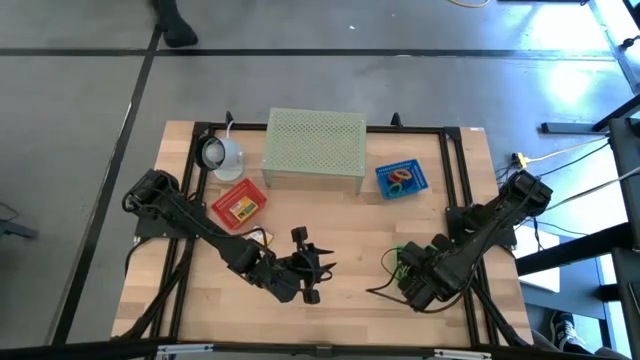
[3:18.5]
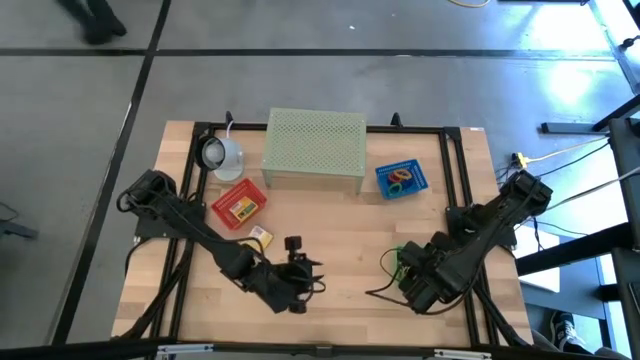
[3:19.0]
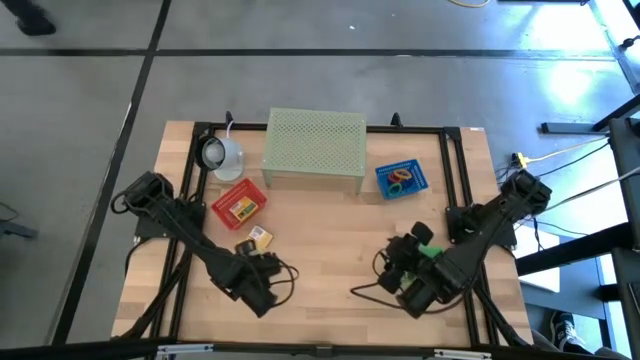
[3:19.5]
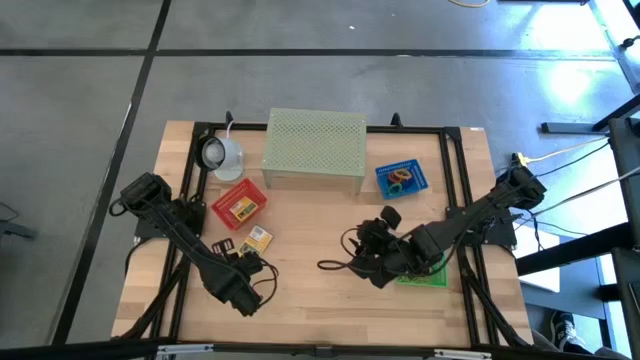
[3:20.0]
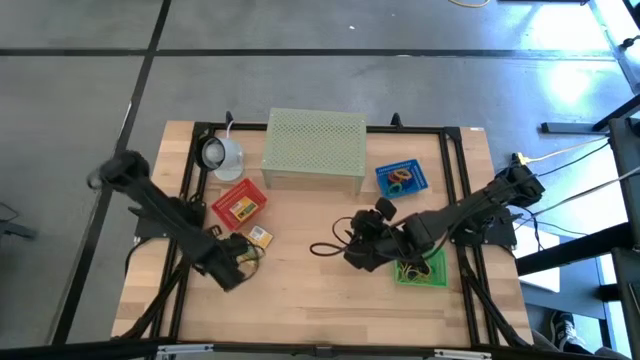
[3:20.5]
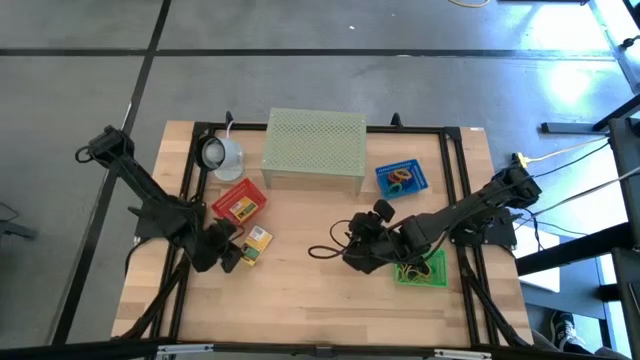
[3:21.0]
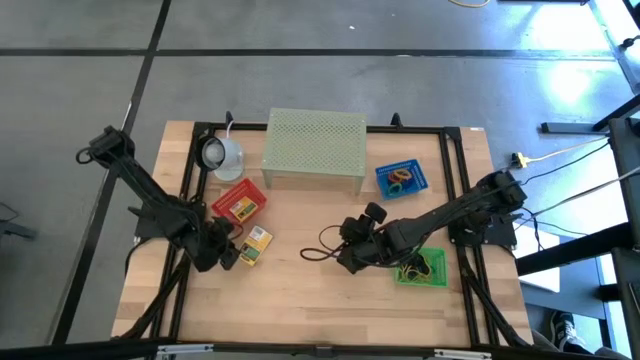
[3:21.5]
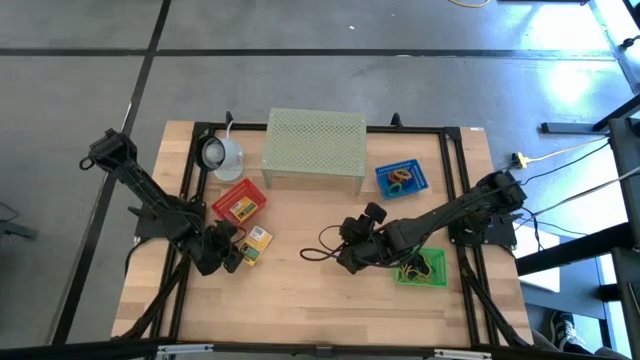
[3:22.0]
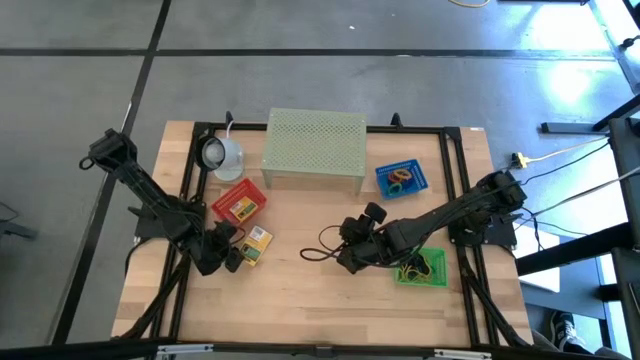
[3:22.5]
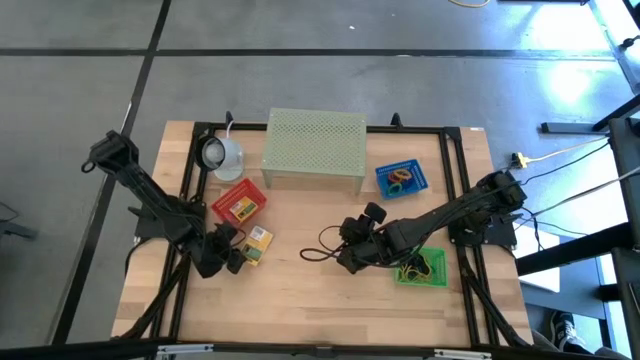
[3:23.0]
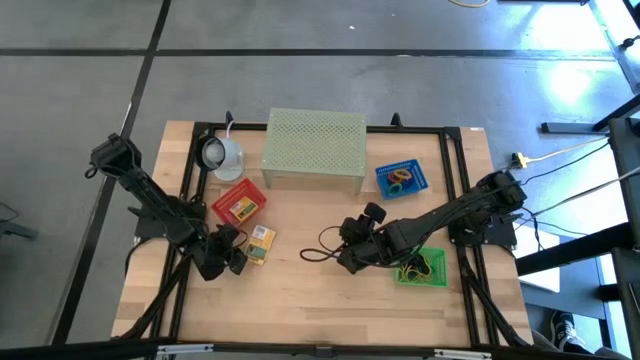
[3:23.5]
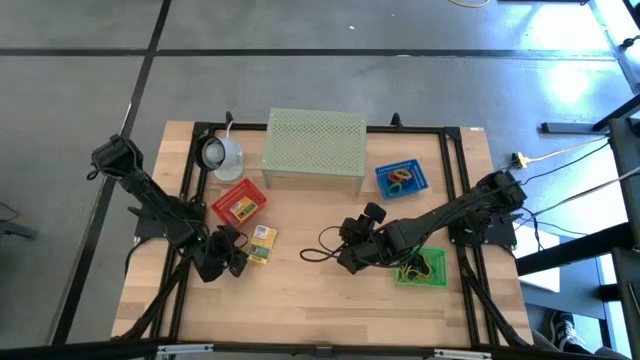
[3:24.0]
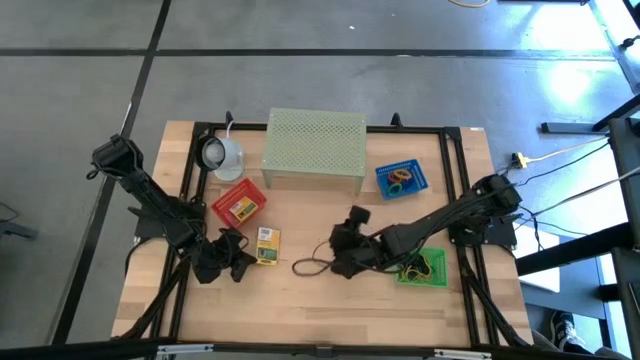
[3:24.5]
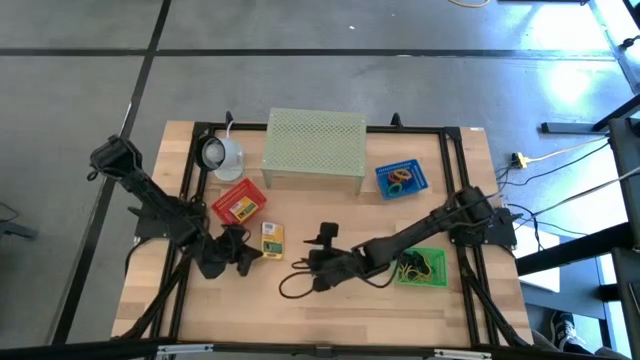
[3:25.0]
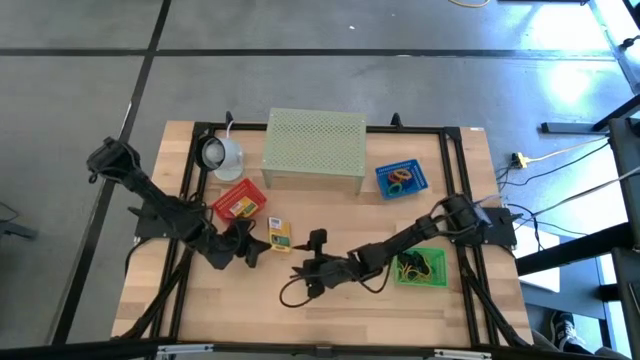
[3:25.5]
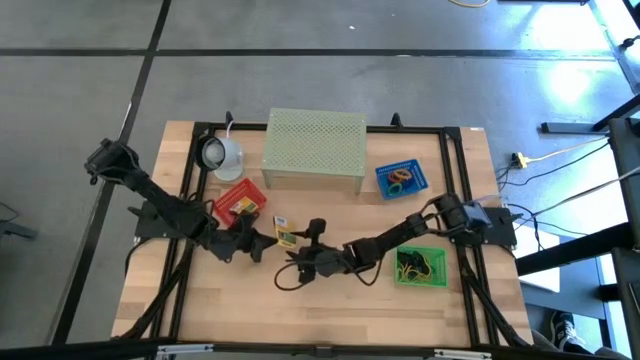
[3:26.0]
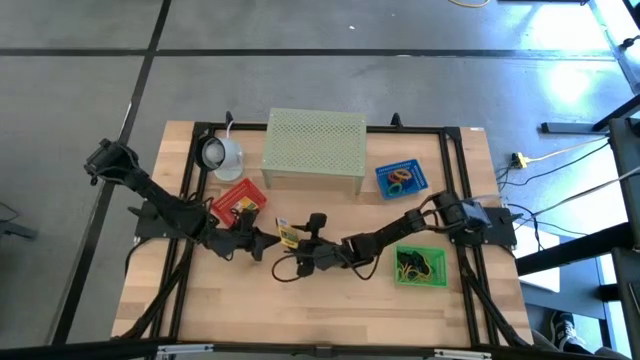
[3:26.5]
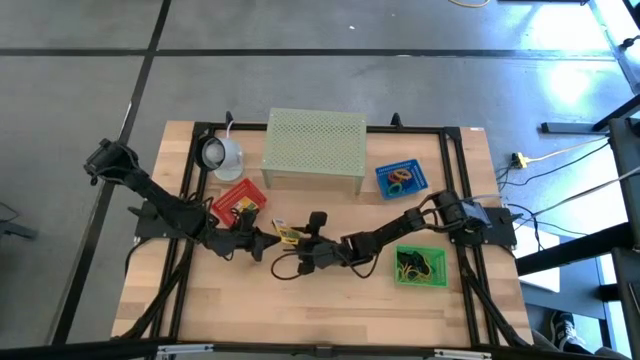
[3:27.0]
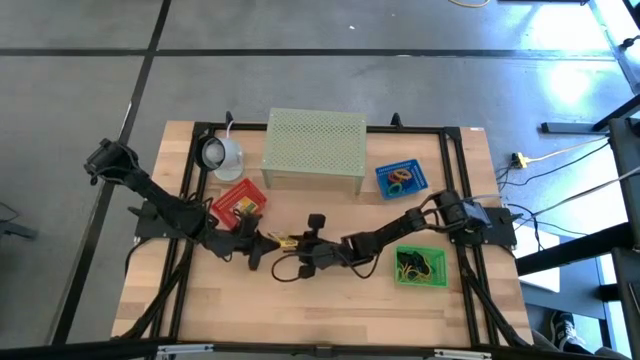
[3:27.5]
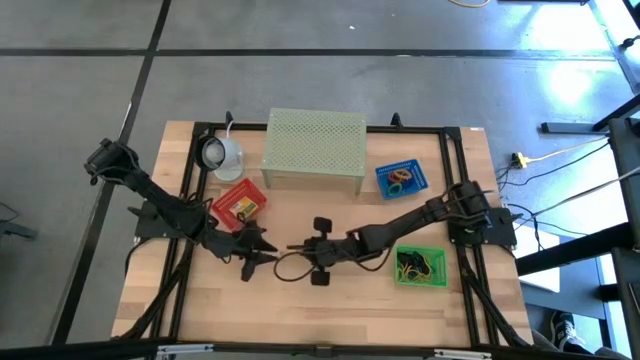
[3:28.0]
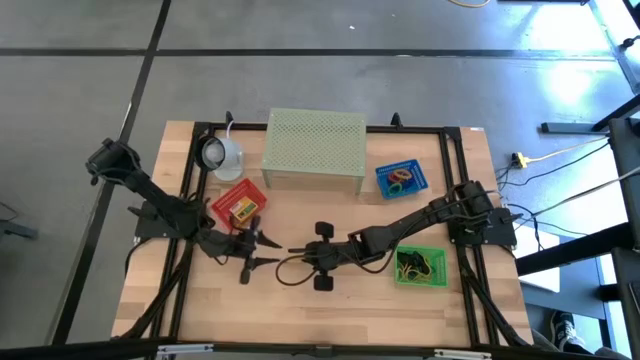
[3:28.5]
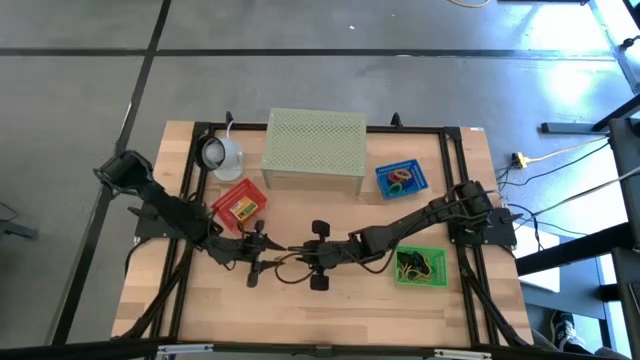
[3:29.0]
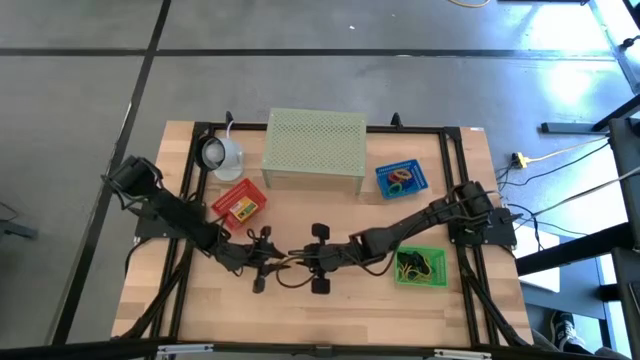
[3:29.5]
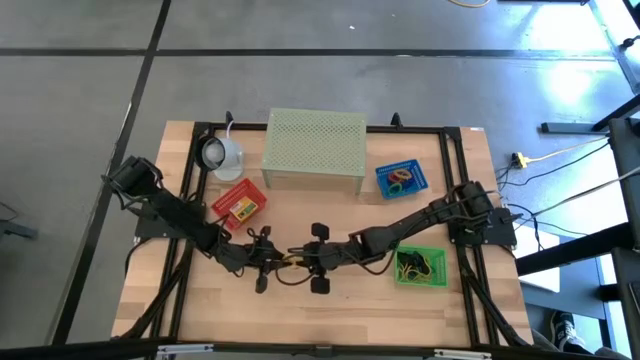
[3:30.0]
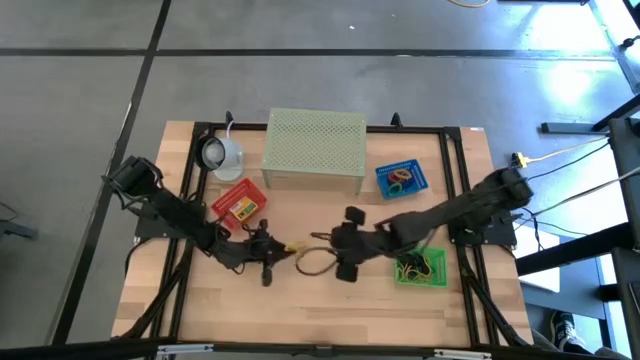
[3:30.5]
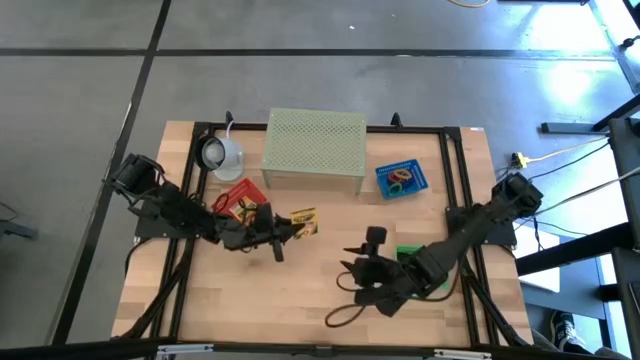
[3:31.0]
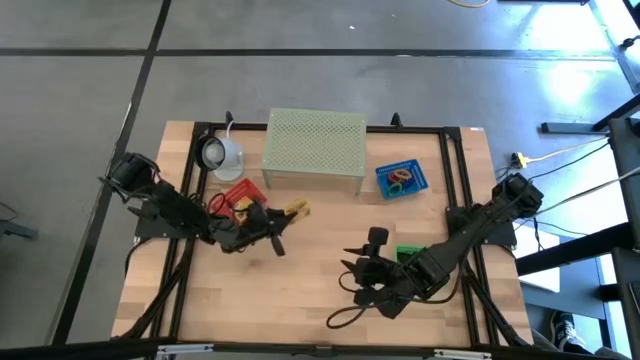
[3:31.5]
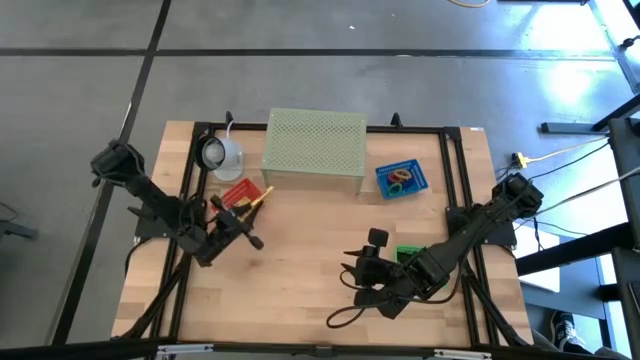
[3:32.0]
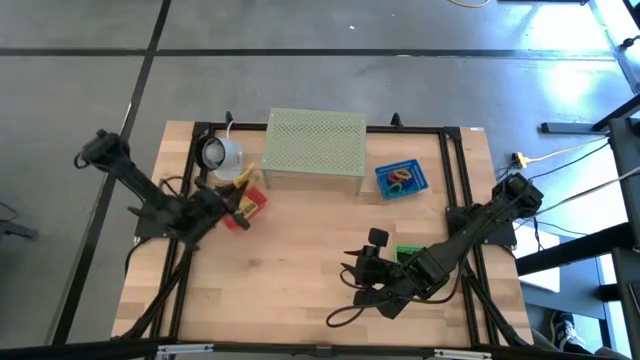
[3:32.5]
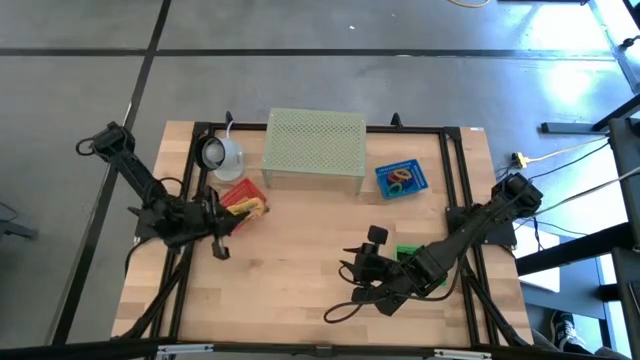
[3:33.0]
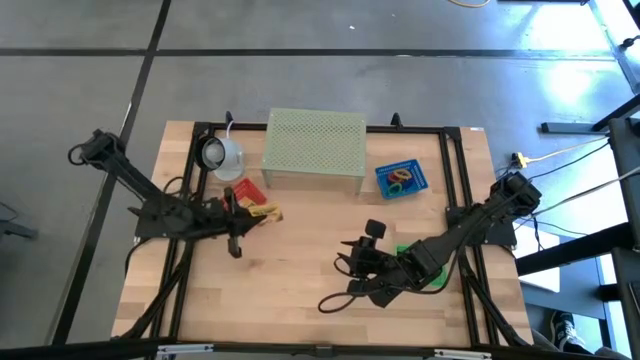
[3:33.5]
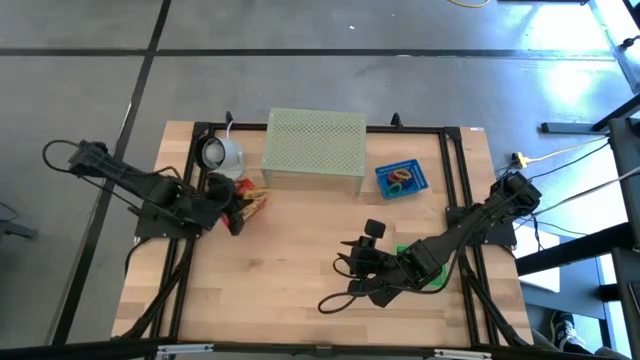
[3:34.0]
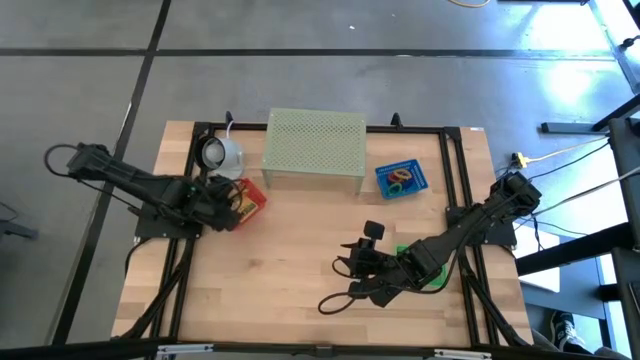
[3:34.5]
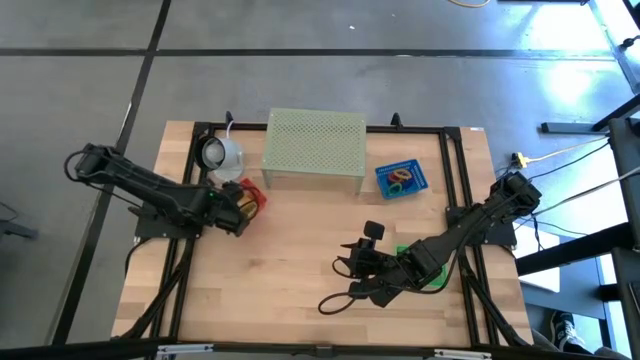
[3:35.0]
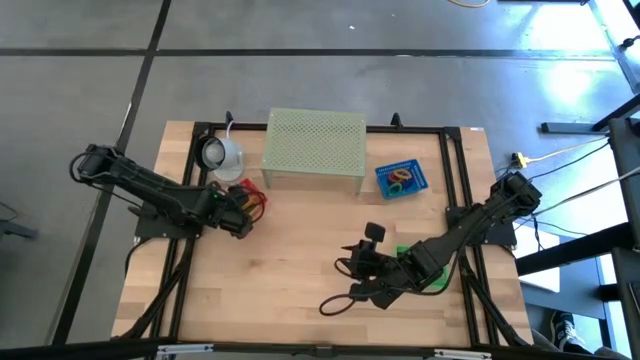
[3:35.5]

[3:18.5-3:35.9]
Task: Pick & Place Office Desk Supplies
Put the yellow crayon box into the red bin

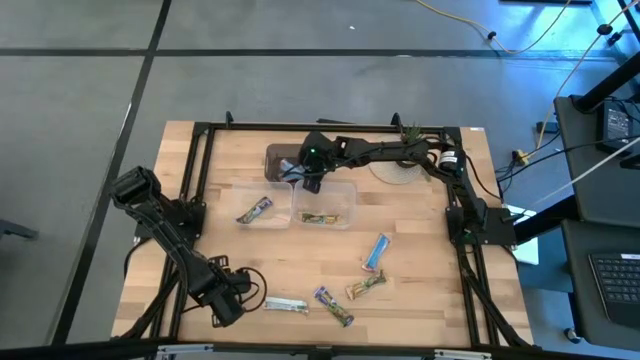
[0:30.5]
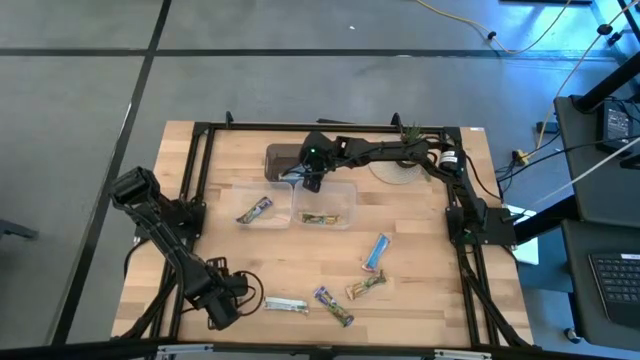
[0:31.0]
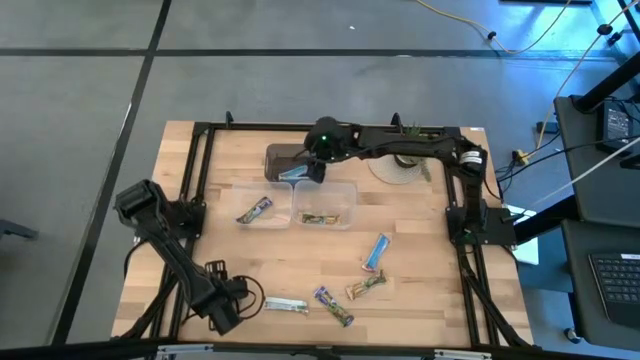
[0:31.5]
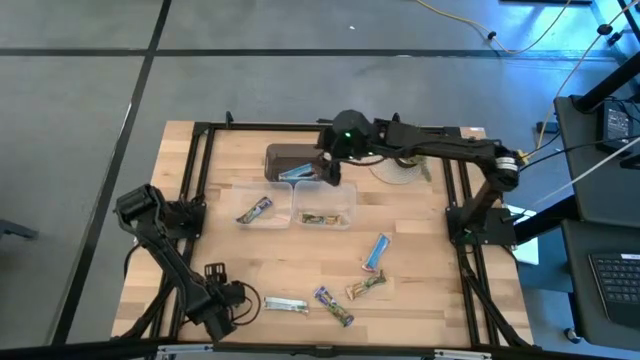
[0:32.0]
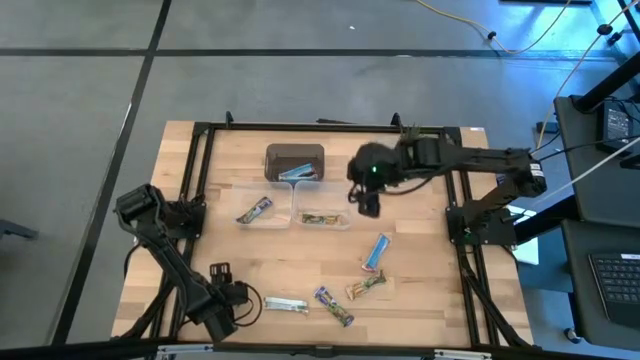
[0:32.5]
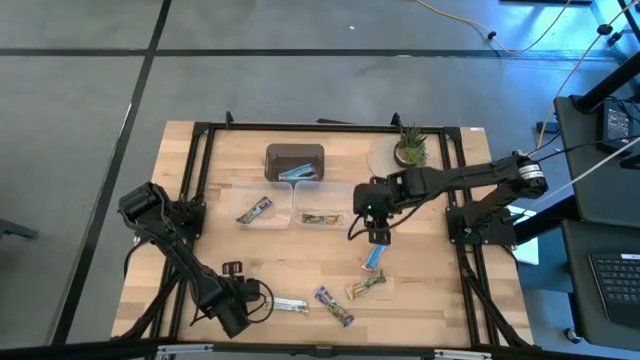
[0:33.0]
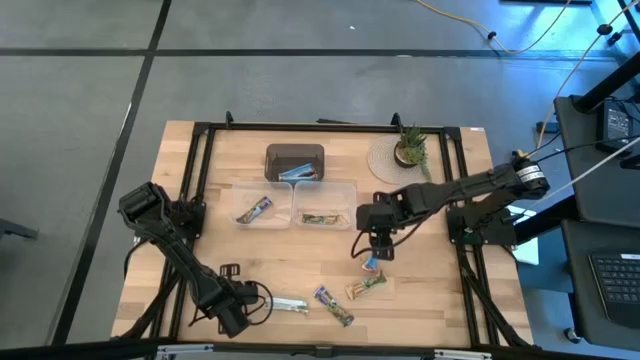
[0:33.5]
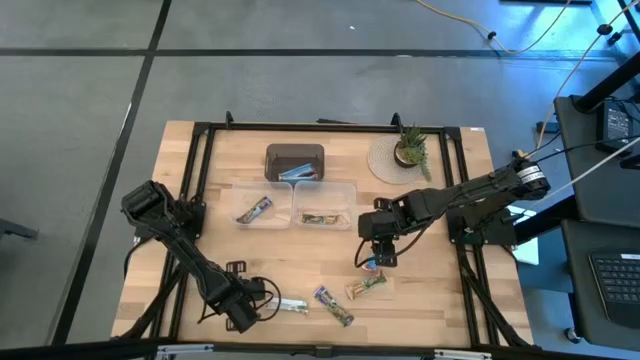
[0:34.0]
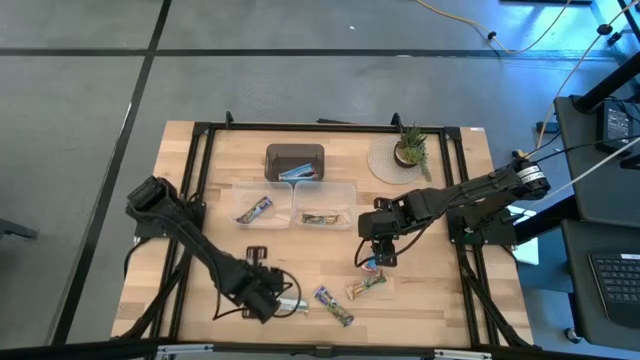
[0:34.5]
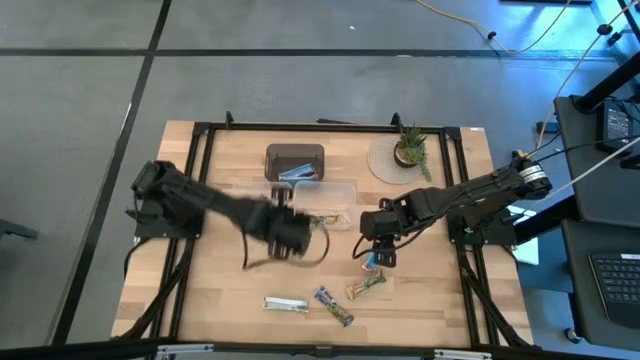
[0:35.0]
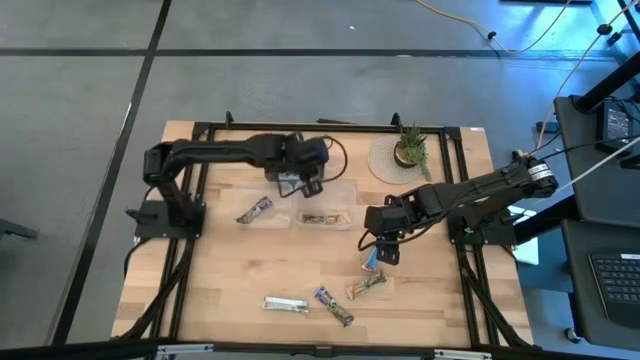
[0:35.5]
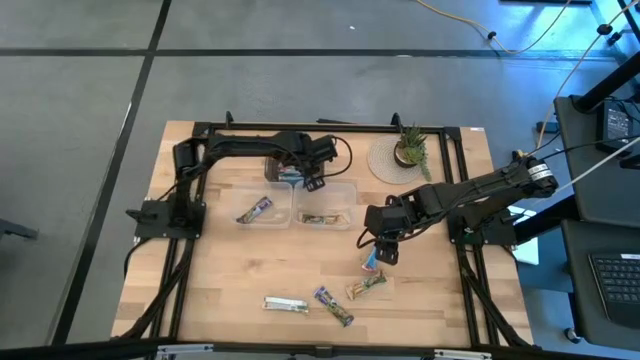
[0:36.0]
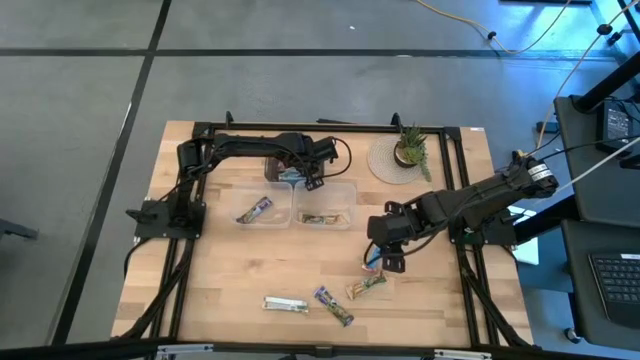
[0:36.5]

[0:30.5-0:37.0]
Task: Pick and place Granola Bars by type
Put the red granola bar into the black bin
